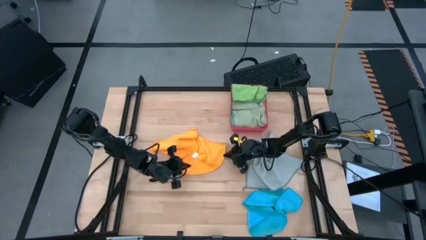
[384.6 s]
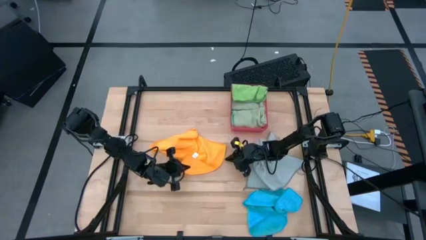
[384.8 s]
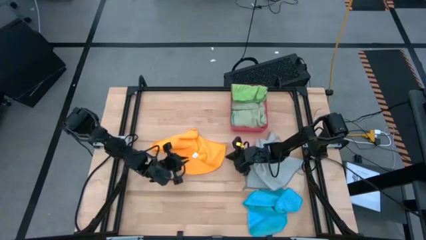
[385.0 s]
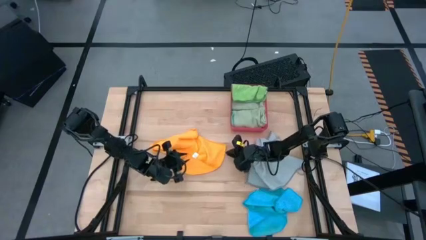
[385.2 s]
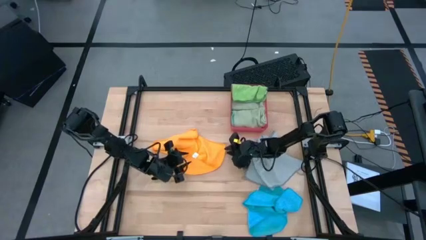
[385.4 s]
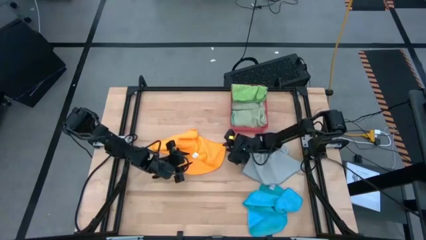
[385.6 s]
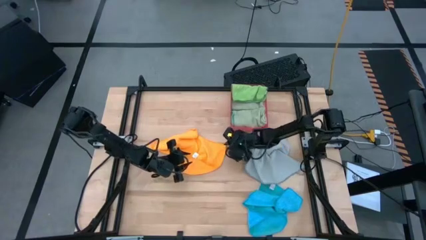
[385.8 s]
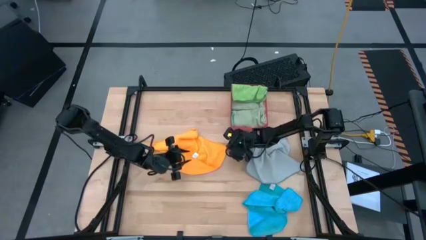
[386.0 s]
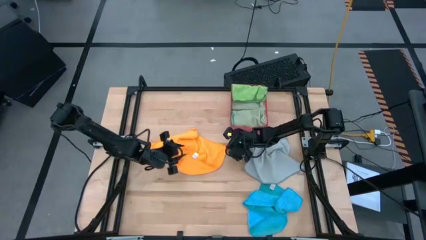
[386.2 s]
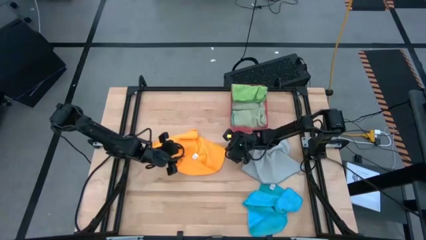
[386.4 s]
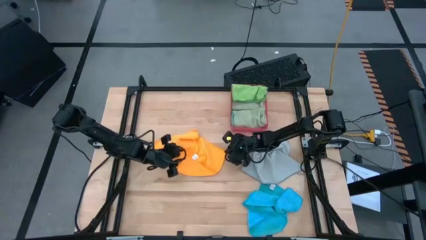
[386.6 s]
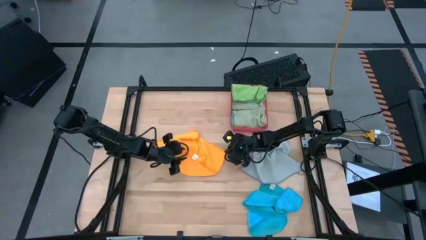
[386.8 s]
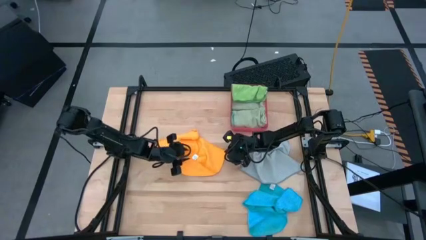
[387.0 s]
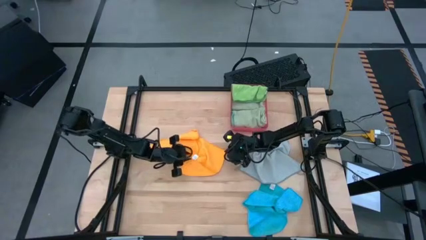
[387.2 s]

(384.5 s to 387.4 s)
Task: Fold microfiber towels
Fold the yellow microfiber cloth

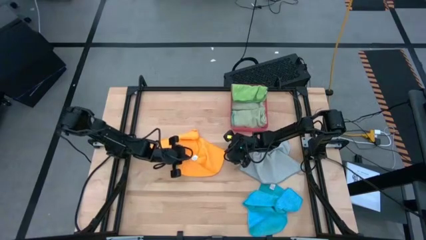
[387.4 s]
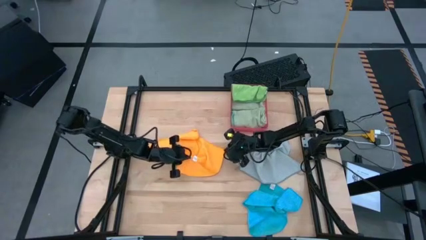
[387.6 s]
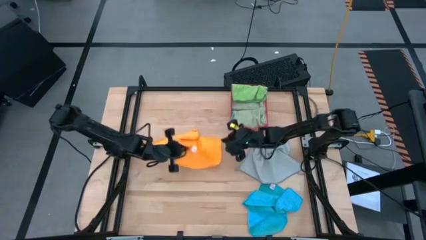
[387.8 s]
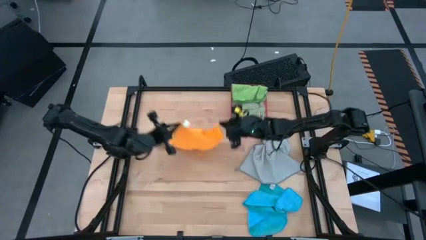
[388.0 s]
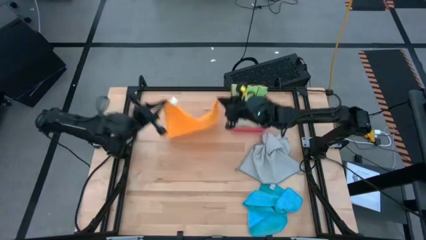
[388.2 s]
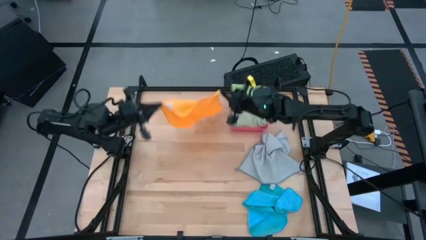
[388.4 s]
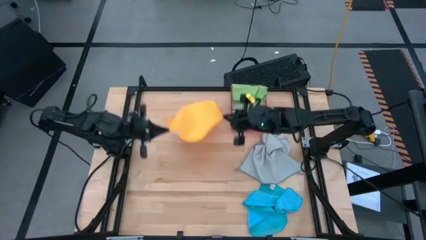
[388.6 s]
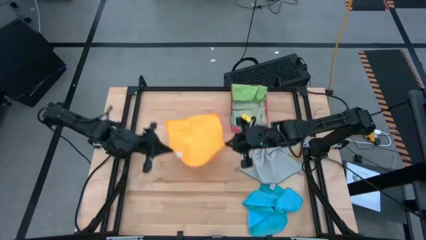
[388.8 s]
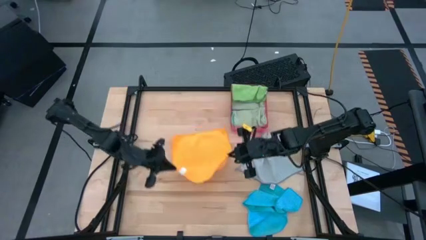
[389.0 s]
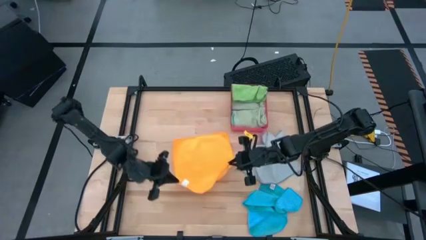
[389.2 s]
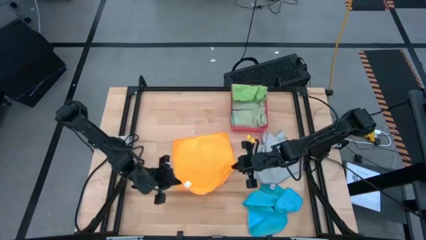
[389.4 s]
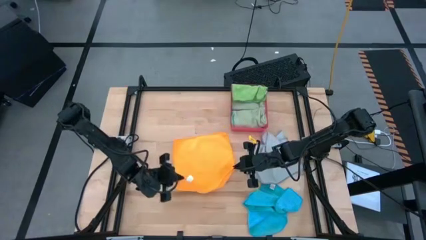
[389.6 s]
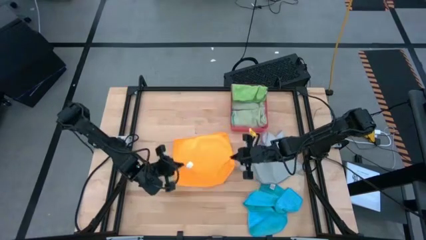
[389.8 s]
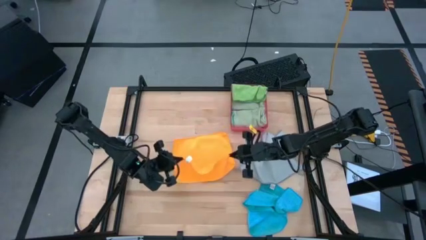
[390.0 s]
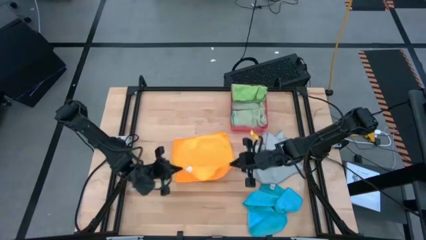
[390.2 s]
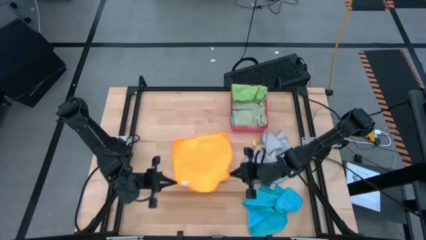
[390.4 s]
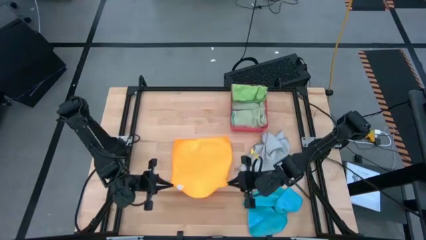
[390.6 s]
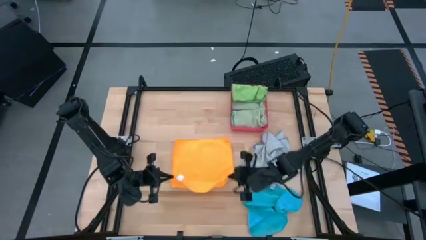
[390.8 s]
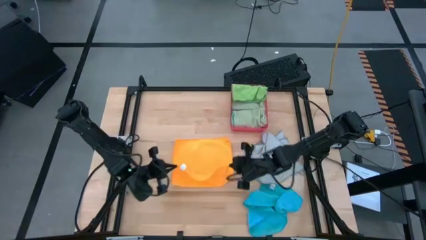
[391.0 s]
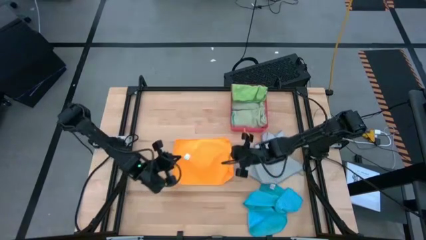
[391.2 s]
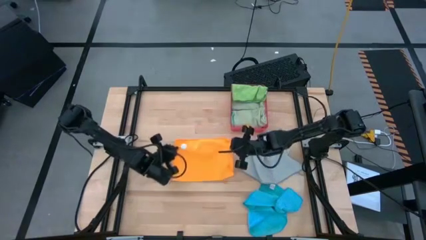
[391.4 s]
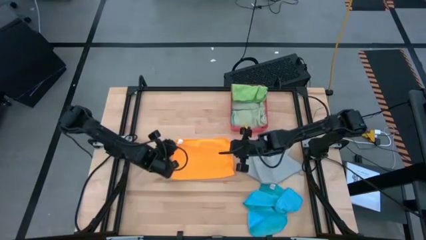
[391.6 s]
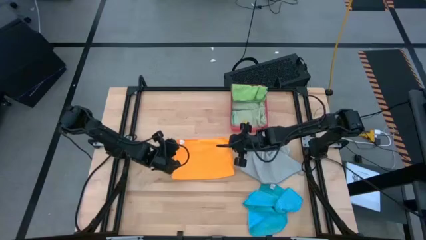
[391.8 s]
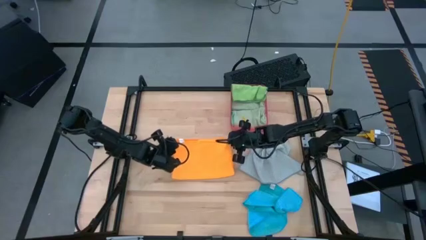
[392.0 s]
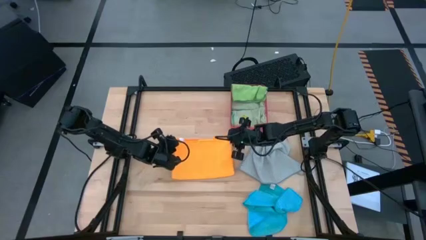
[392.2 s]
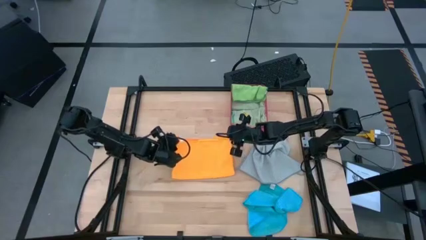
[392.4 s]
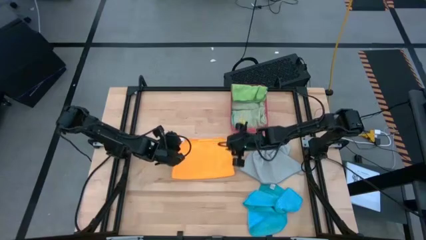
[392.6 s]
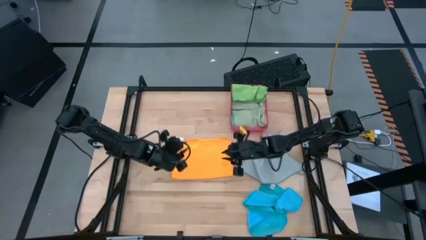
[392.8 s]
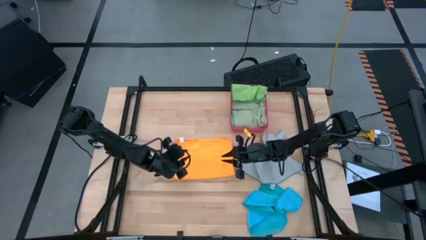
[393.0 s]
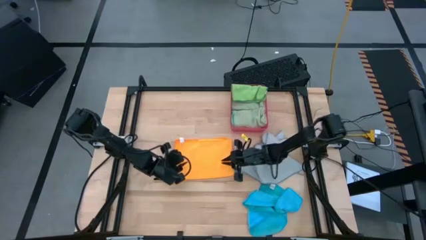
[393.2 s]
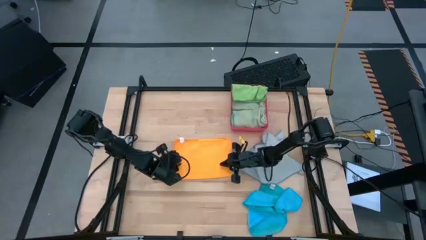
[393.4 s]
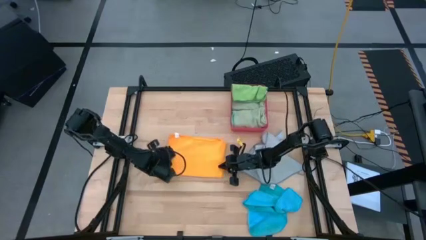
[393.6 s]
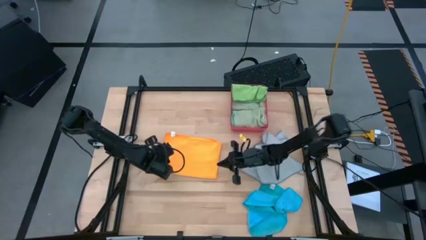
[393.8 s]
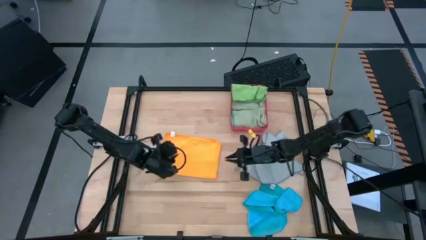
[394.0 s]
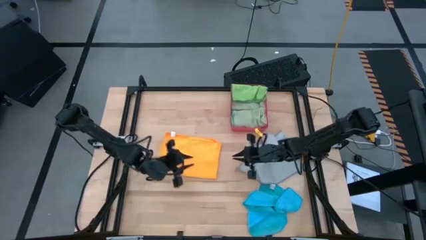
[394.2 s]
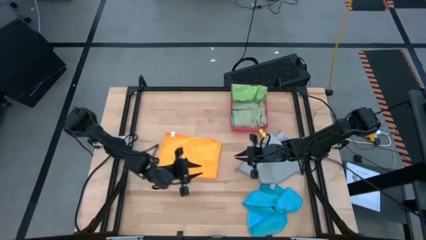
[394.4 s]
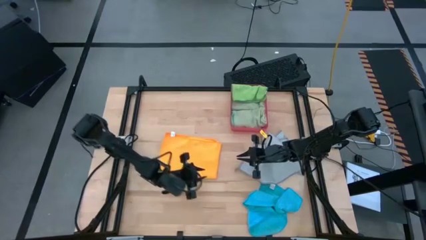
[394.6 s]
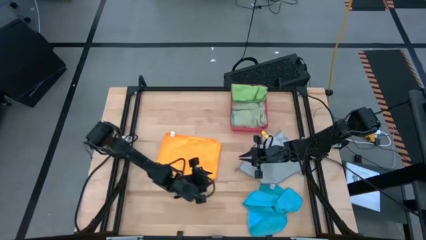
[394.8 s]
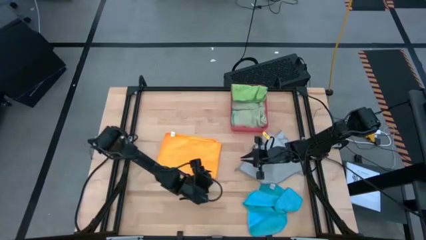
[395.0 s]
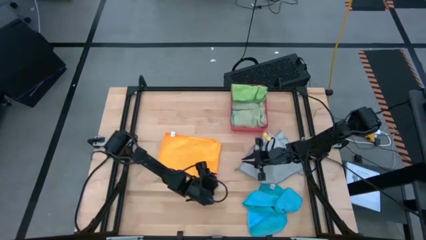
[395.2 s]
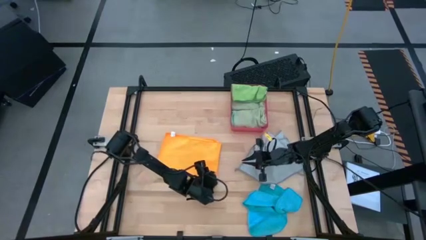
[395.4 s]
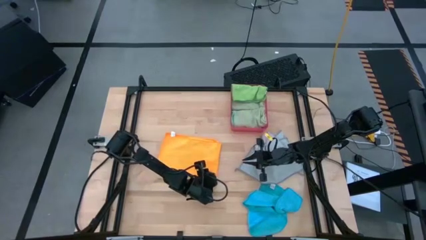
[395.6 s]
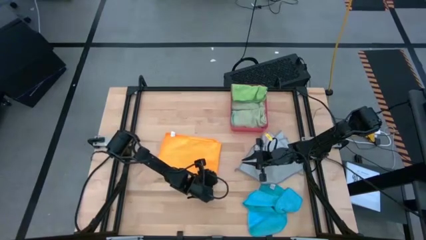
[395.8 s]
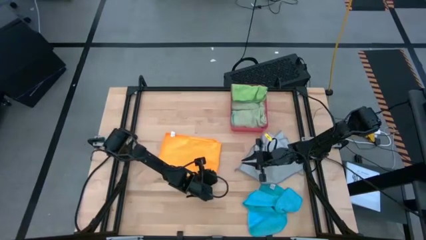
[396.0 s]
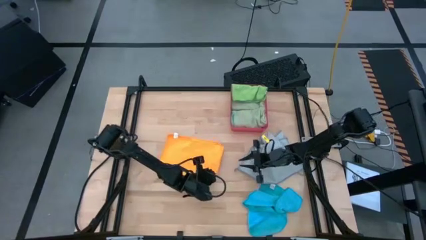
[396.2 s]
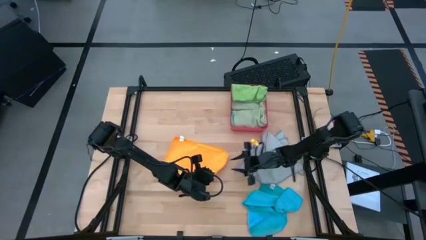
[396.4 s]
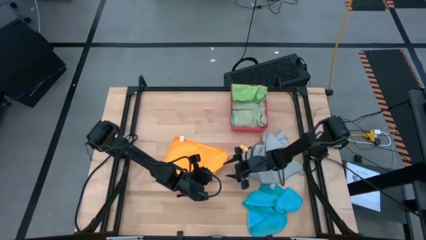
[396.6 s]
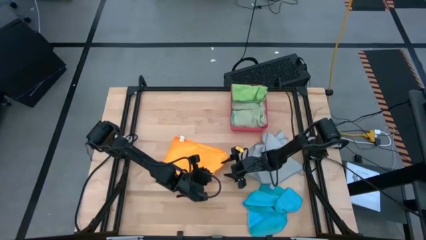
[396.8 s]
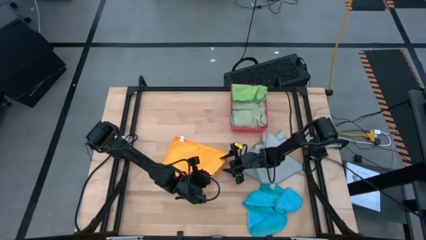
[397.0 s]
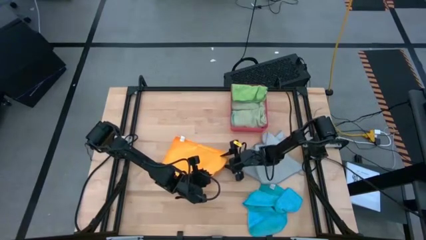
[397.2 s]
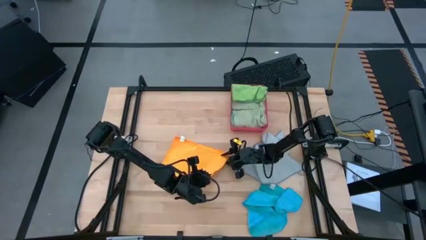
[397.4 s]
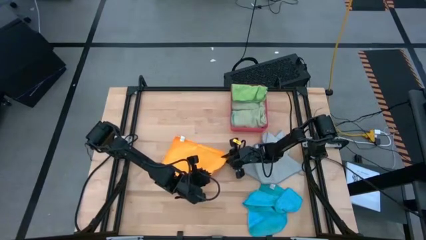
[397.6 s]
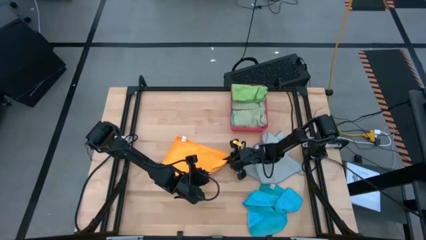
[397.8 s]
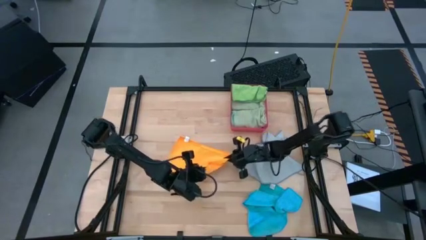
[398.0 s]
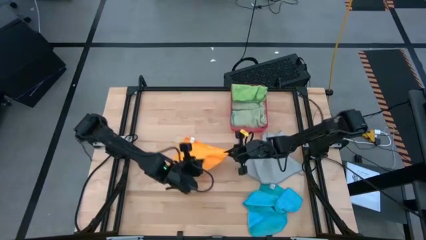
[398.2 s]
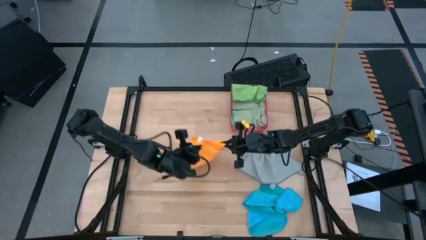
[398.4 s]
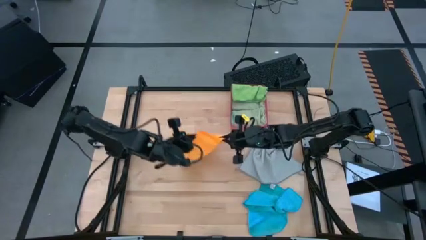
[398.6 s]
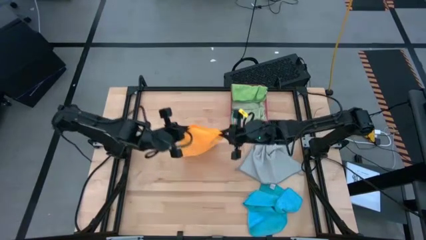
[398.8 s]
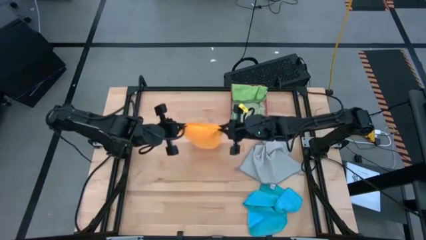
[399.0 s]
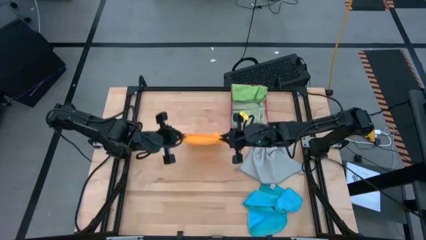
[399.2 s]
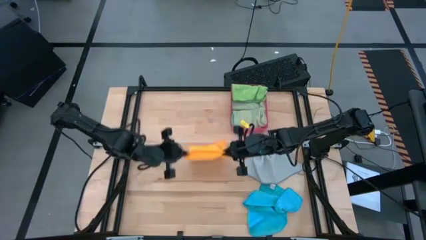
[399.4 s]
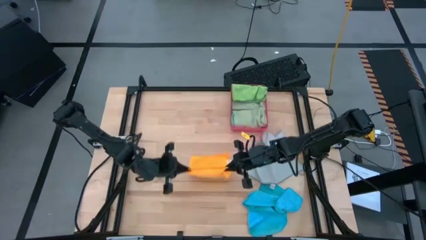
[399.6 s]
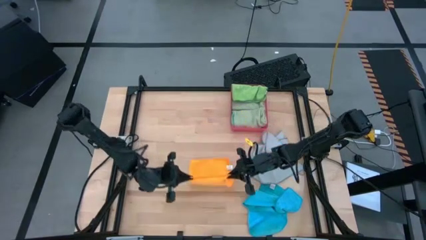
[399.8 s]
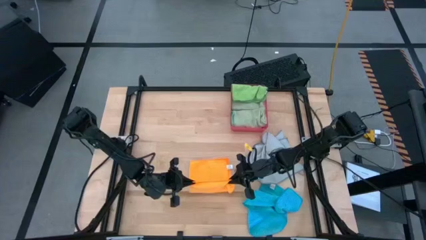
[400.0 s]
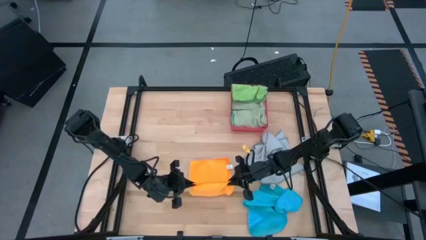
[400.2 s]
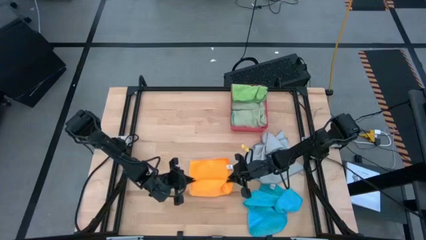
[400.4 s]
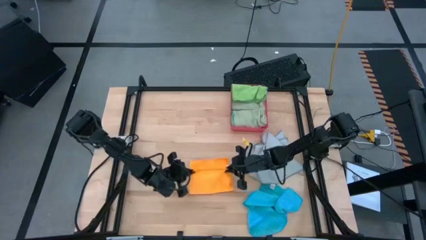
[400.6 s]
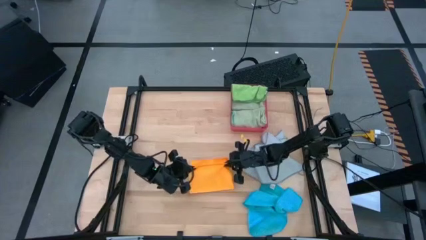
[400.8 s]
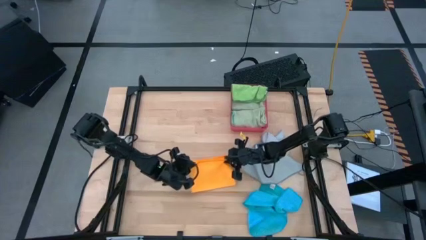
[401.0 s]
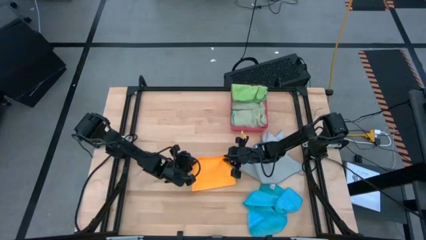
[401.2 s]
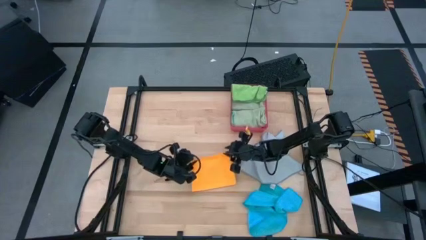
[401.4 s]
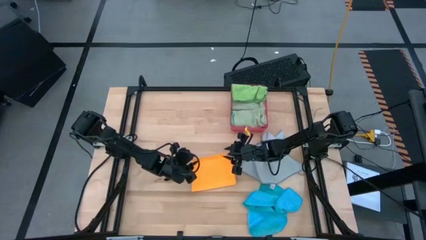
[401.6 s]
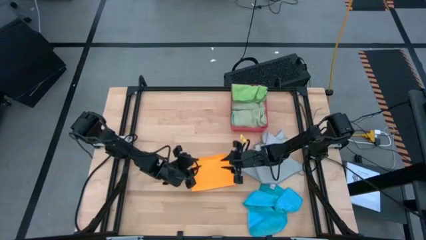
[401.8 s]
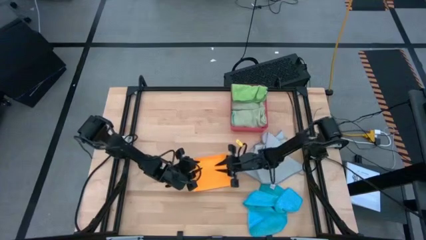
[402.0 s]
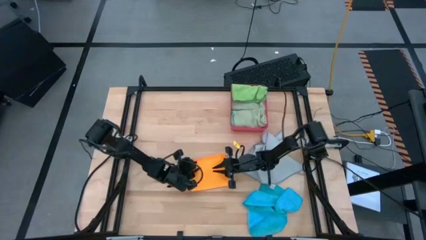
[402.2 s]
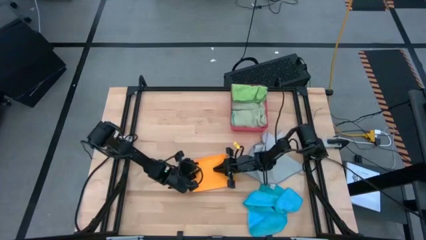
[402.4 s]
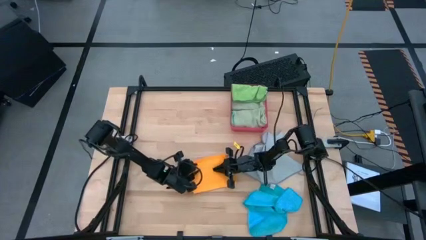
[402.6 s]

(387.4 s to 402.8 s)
Fold the yellow microfiber cloth
